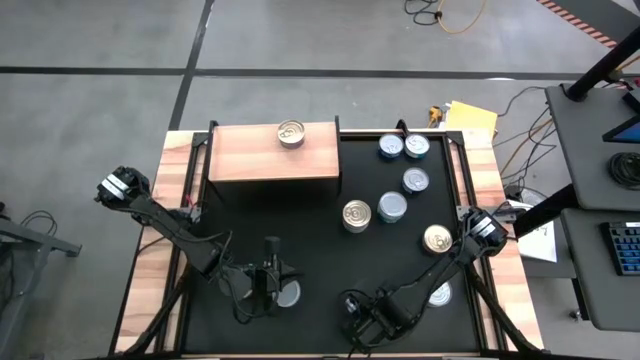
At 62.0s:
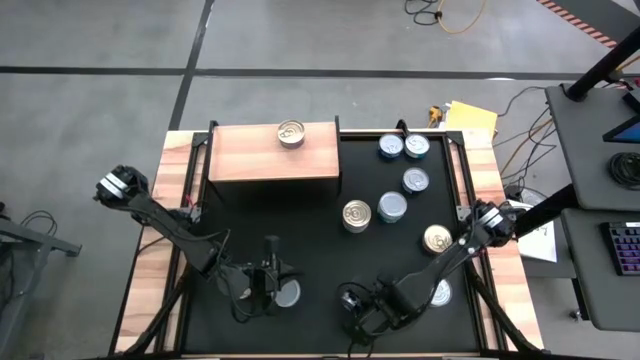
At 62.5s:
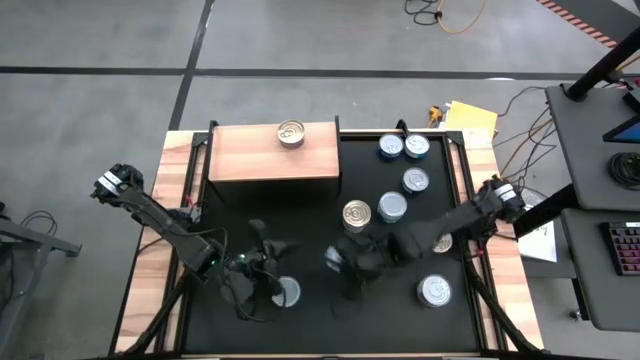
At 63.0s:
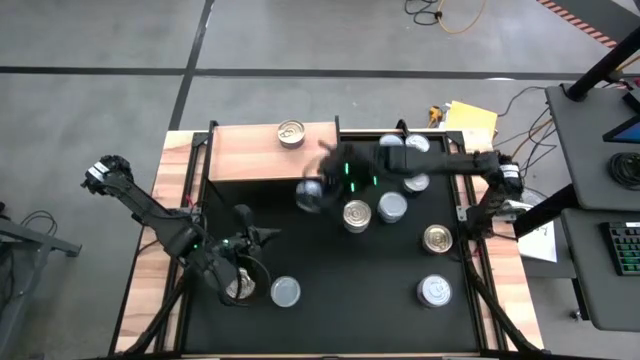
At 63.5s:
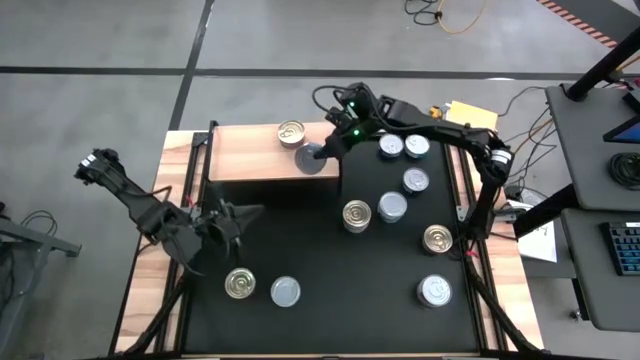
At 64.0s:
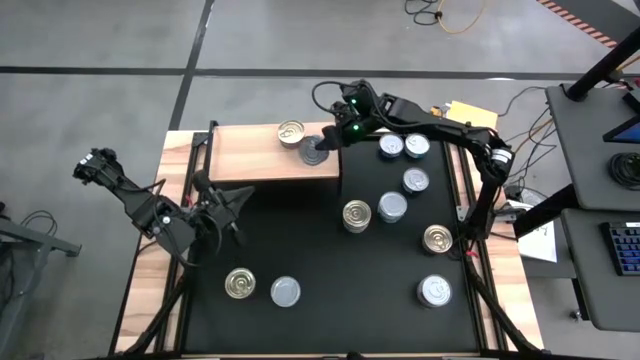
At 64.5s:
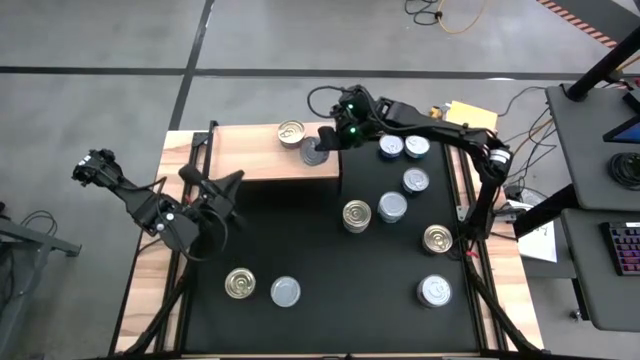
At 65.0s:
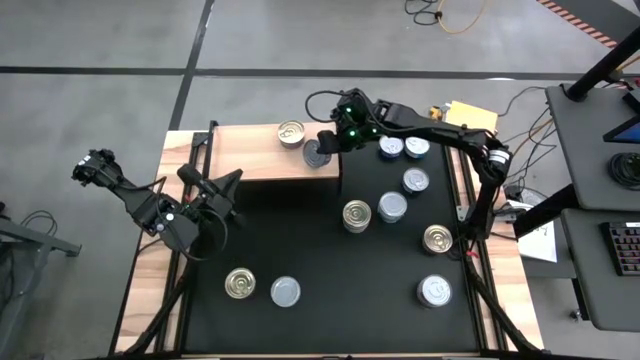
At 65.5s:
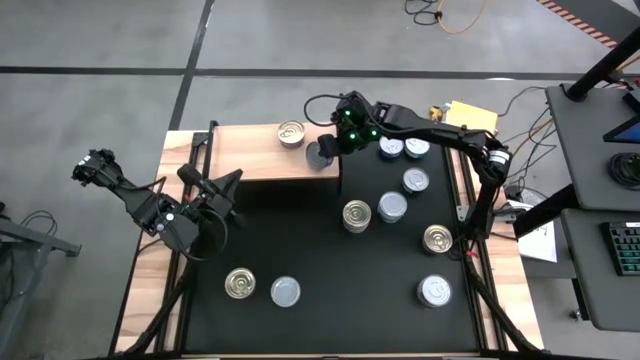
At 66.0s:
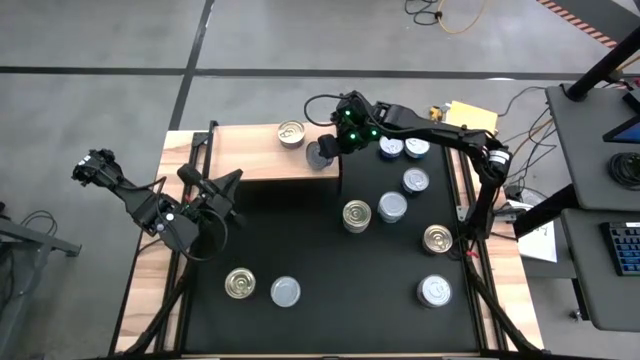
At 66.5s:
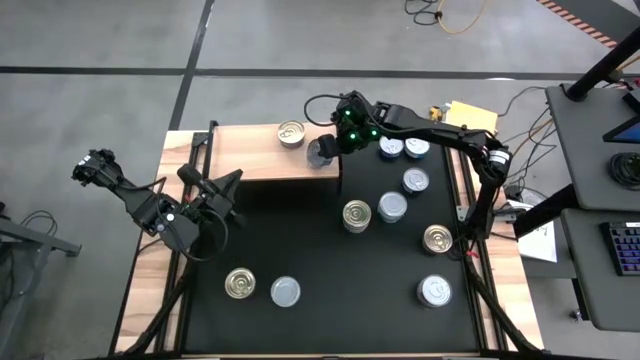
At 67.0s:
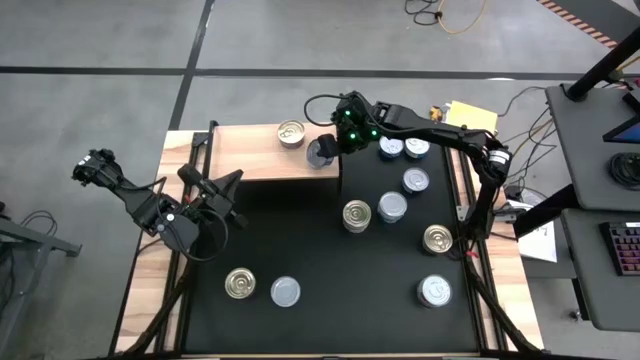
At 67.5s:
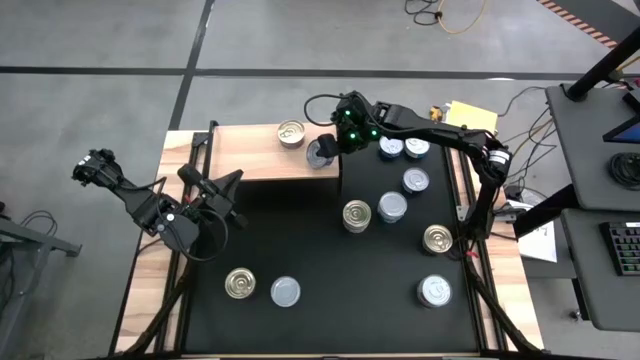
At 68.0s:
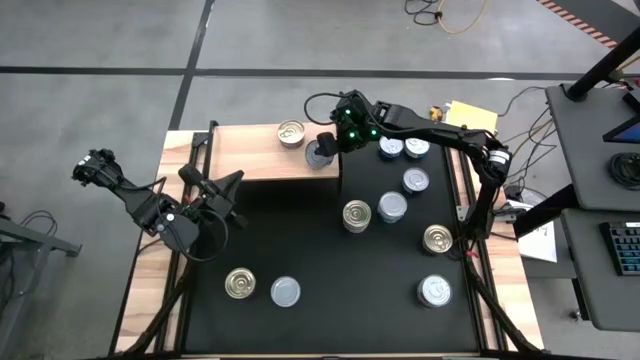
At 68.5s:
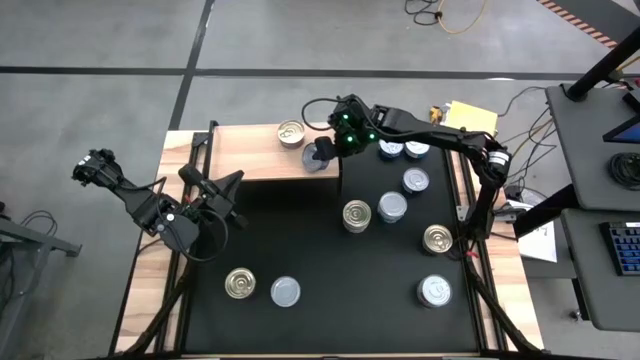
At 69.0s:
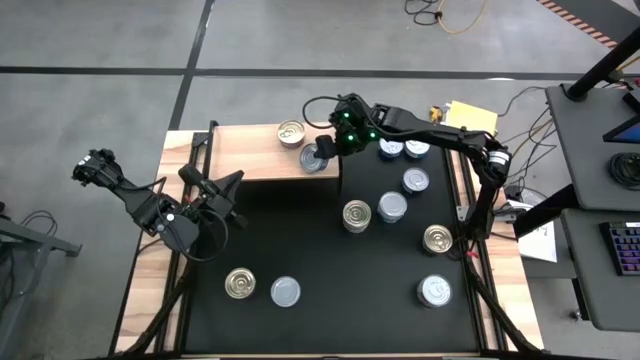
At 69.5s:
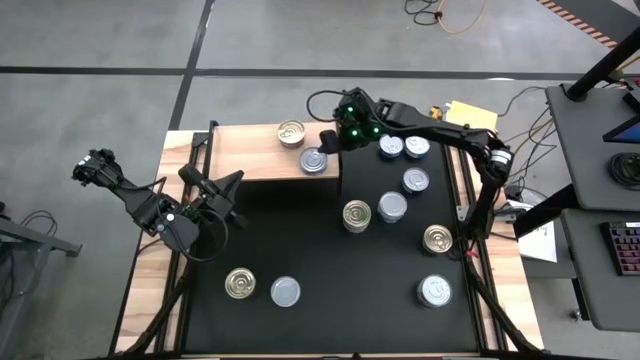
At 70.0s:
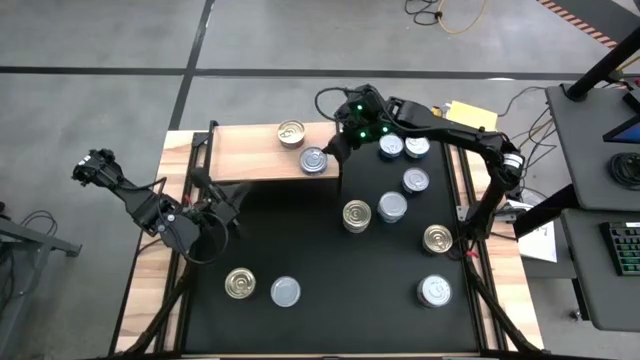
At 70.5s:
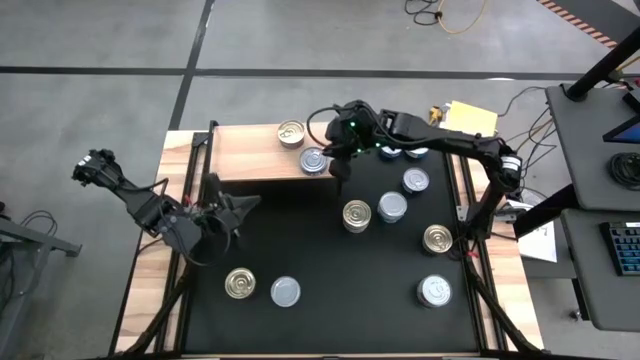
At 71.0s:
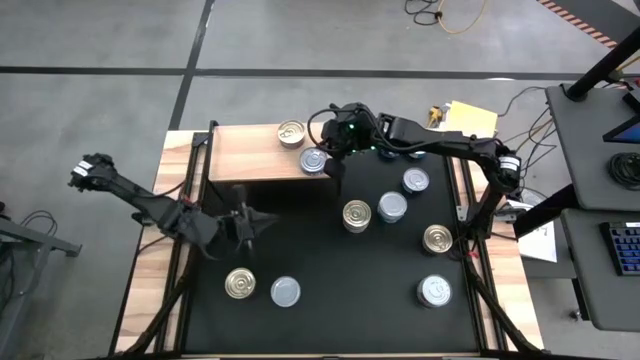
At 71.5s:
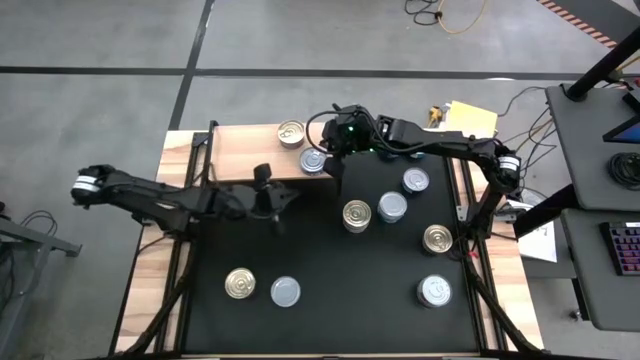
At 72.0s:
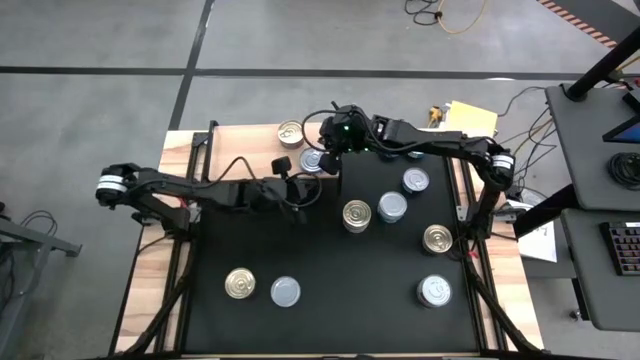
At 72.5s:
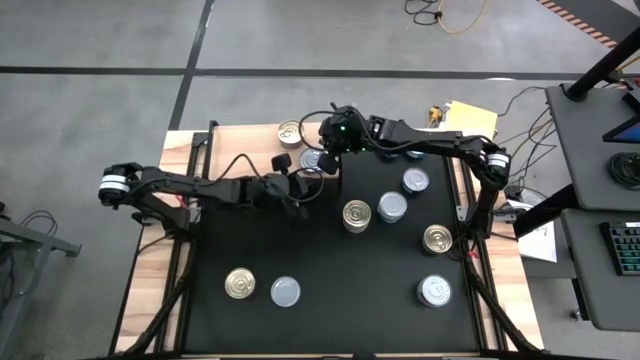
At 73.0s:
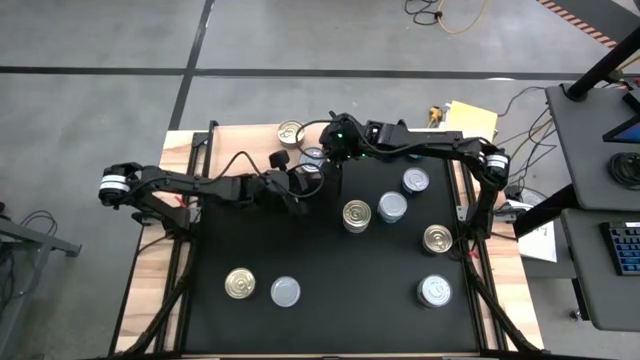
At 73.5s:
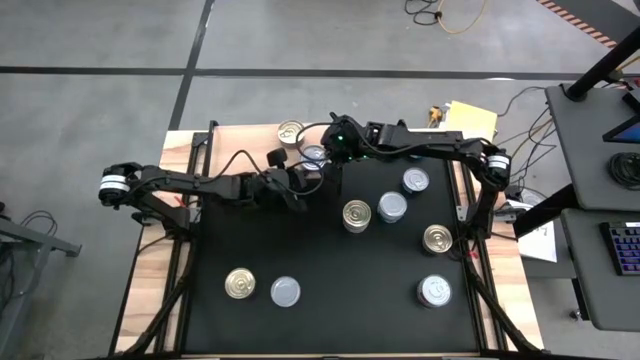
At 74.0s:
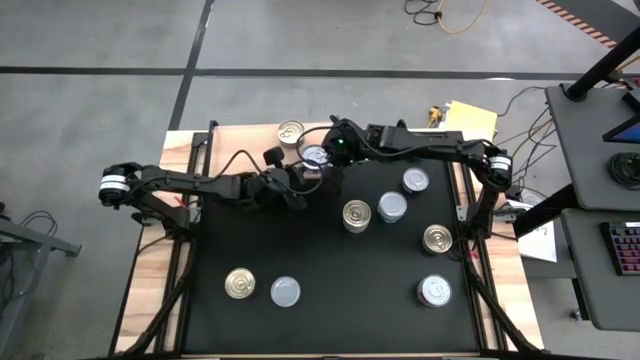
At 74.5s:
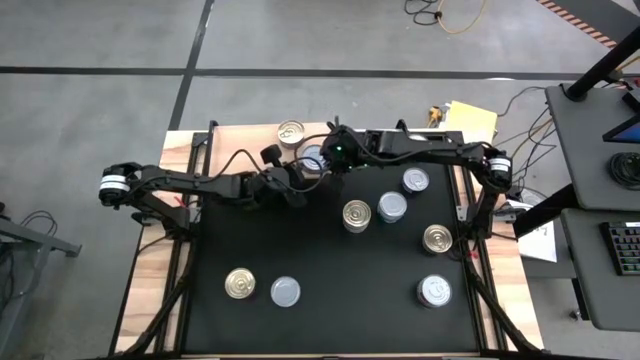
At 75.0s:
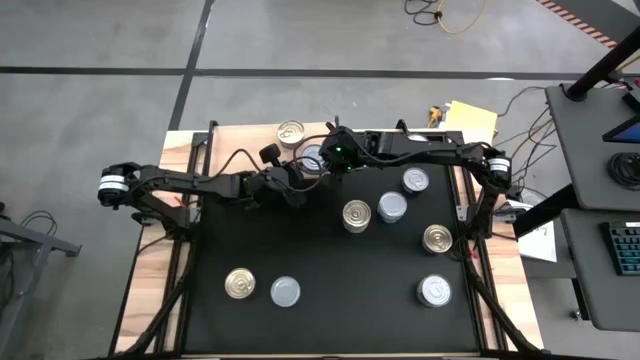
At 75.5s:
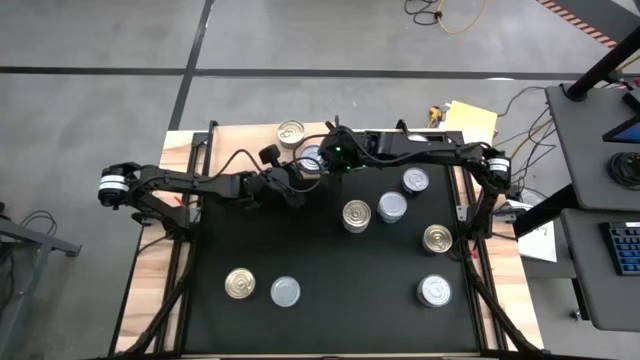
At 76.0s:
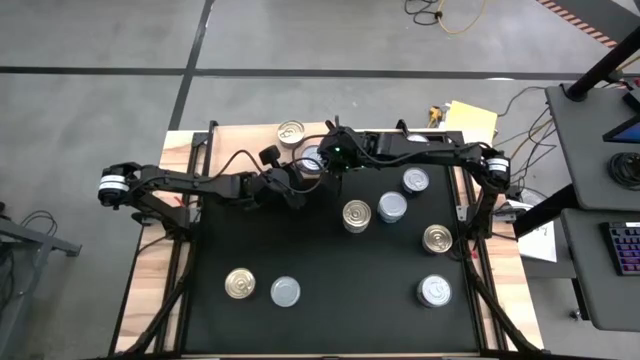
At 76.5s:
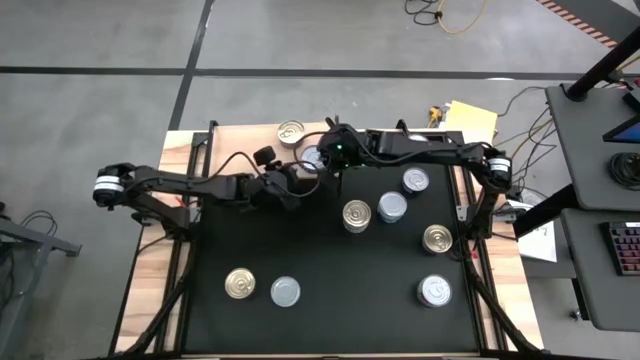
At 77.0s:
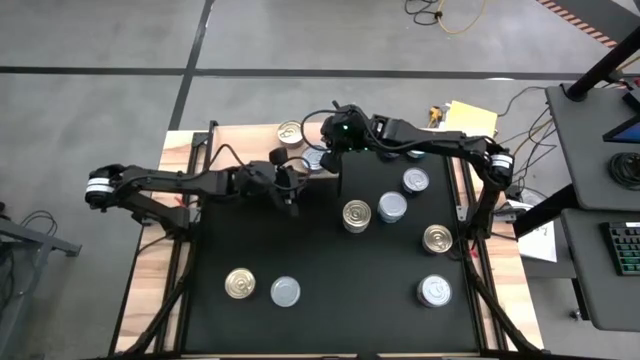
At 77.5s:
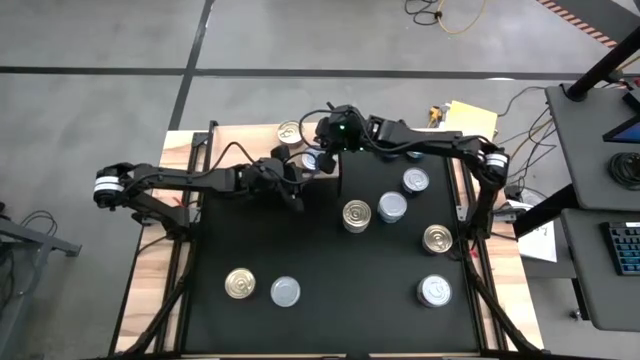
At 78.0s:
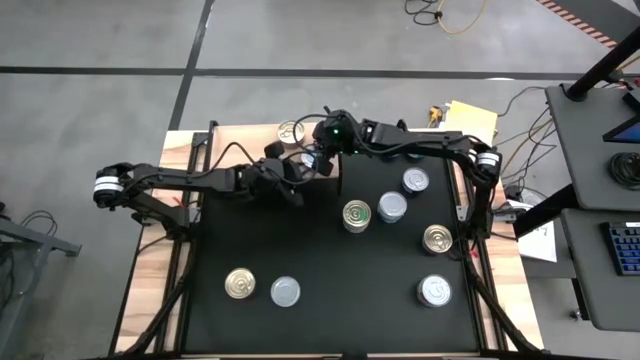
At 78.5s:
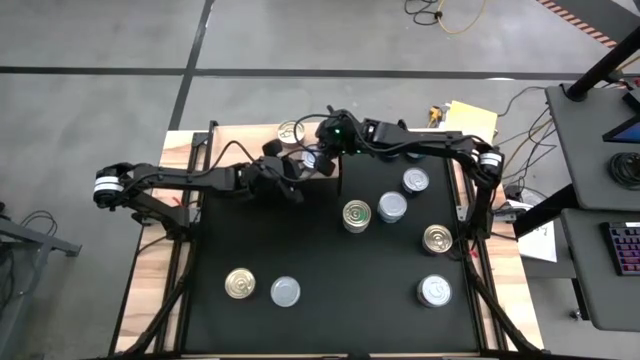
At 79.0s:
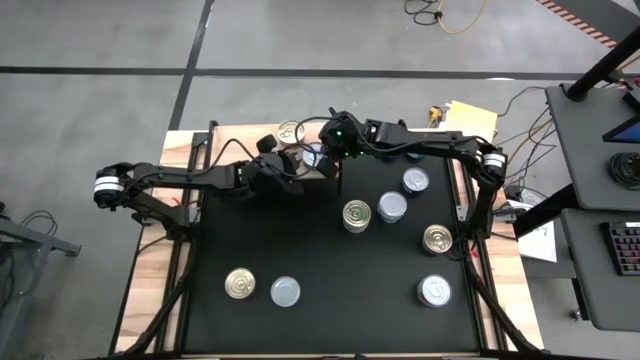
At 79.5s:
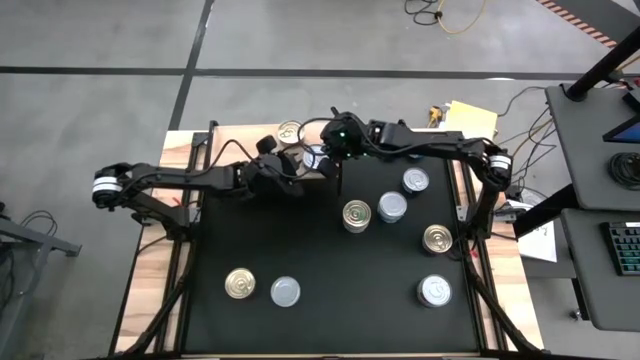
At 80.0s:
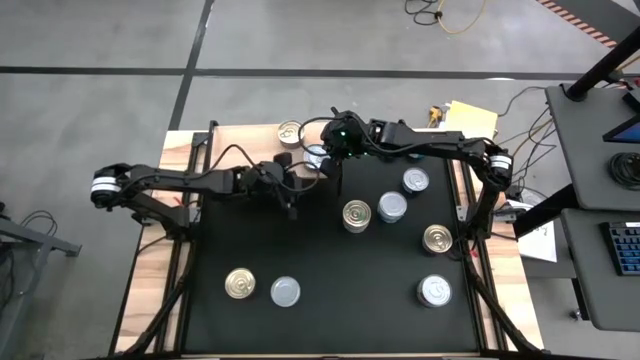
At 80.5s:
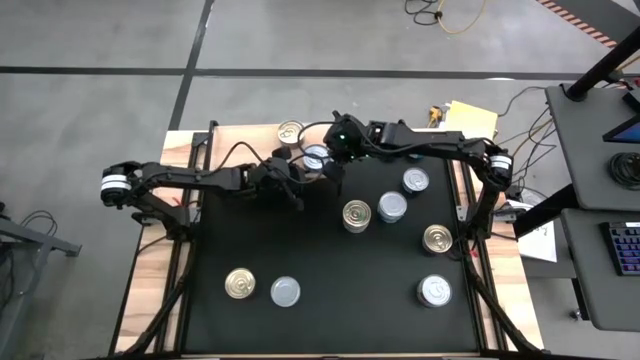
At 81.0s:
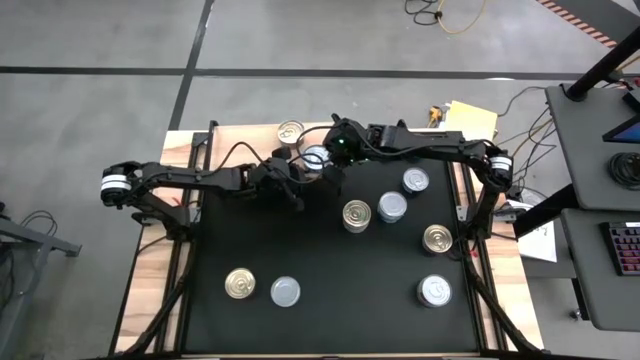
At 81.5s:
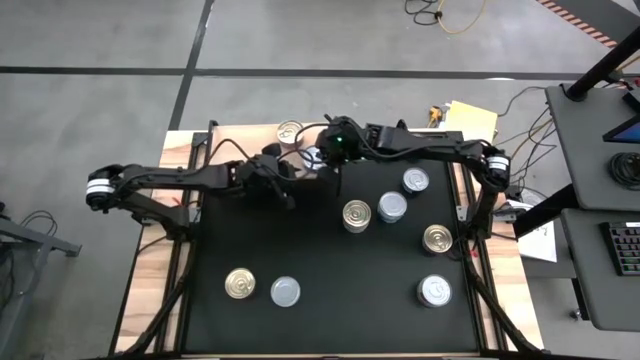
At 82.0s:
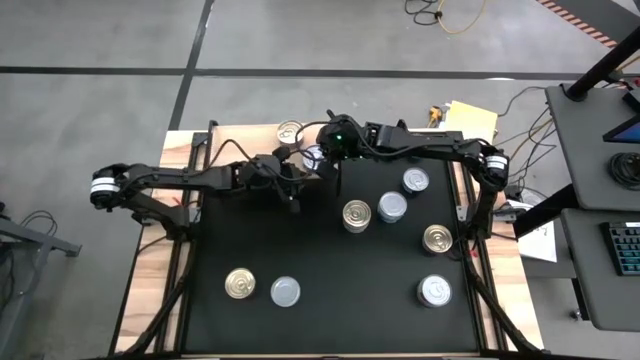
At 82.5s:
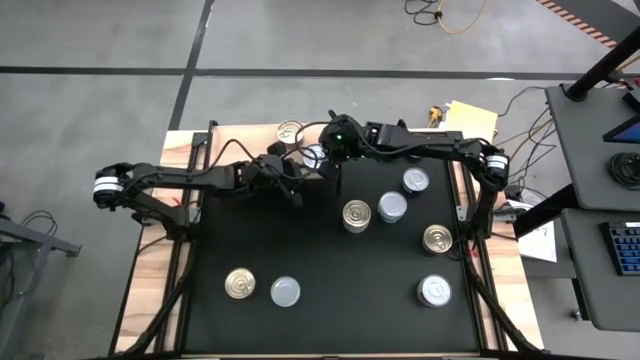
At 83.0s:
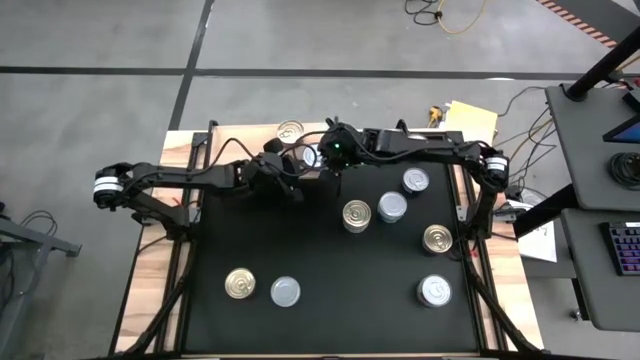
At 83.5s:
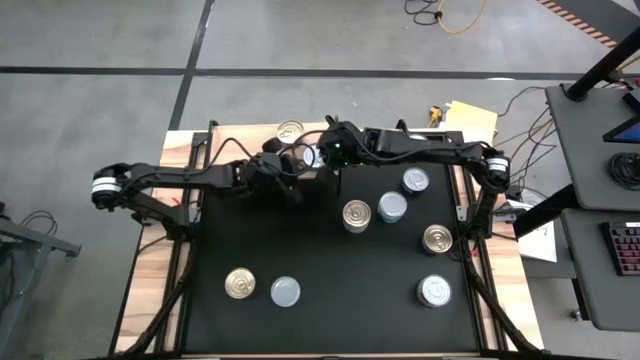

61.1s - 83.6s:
Task: Stack canned seafood by type on shelf
Put the blue tuna can on the shelf
